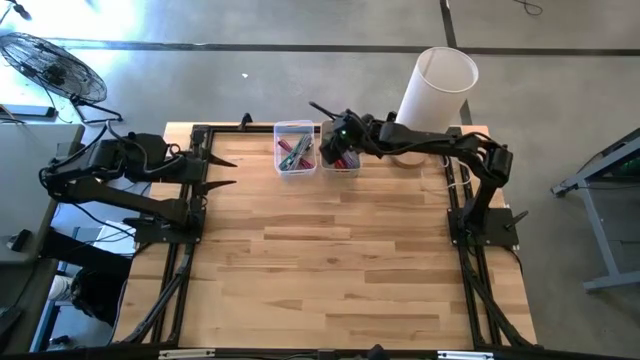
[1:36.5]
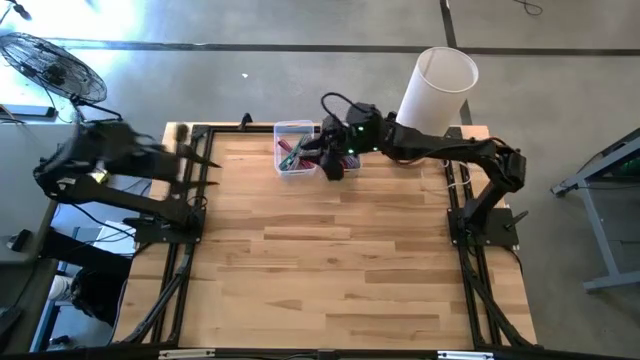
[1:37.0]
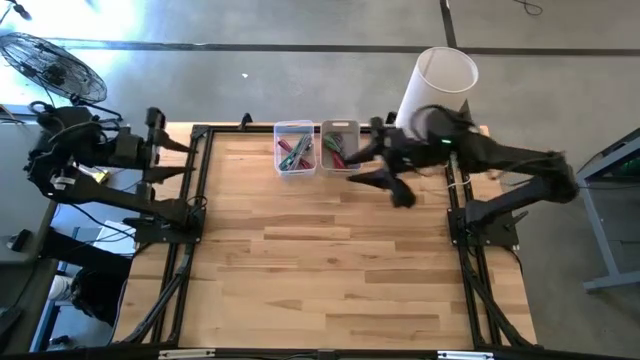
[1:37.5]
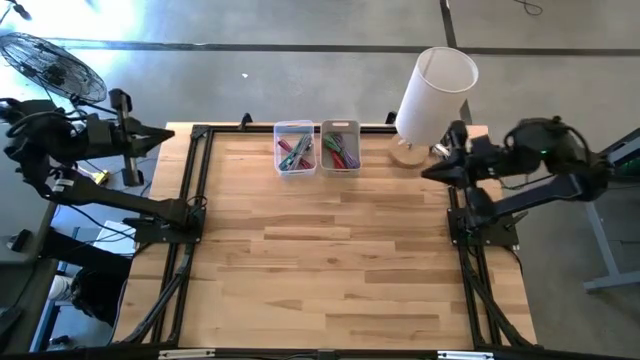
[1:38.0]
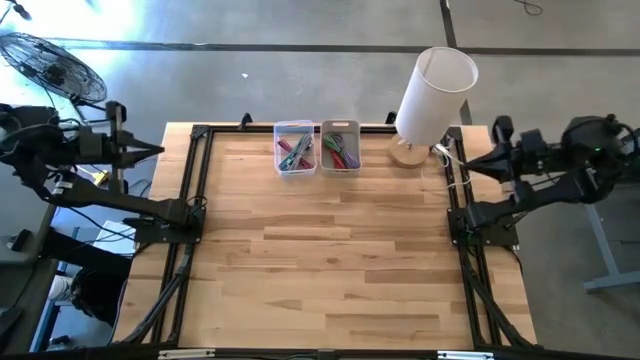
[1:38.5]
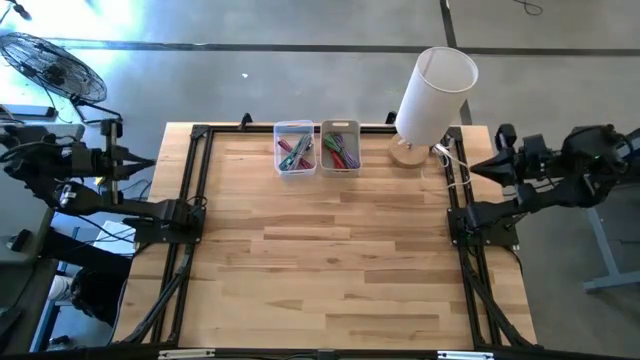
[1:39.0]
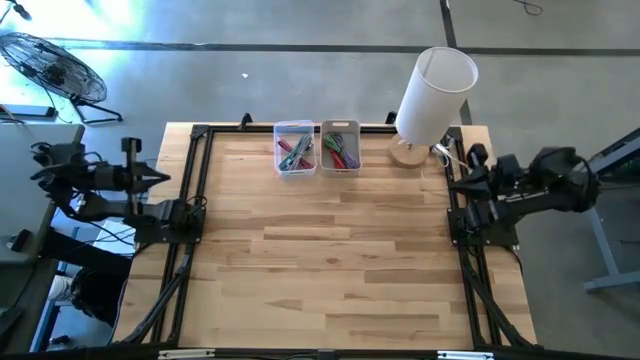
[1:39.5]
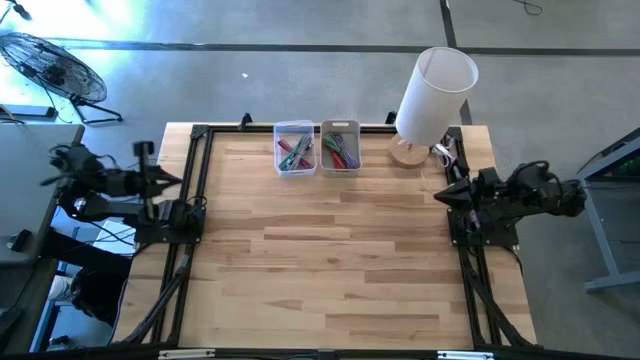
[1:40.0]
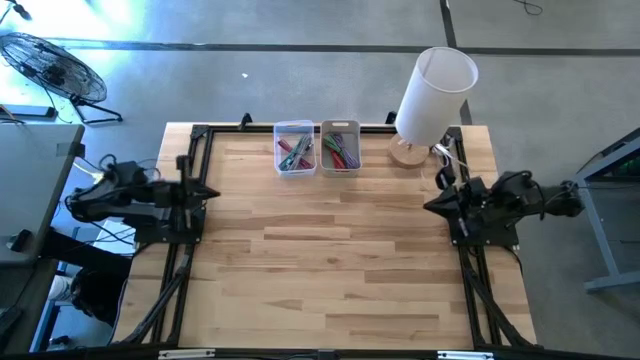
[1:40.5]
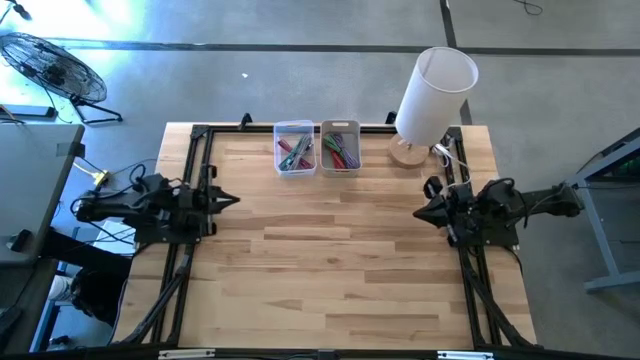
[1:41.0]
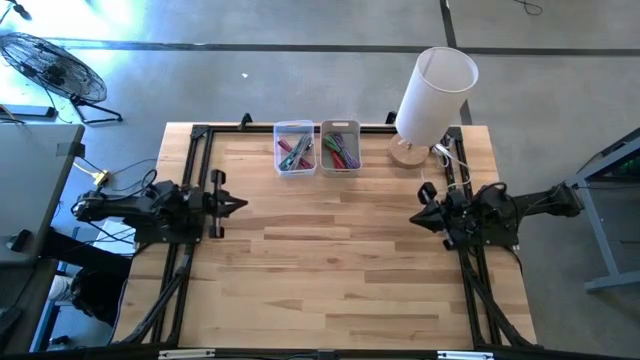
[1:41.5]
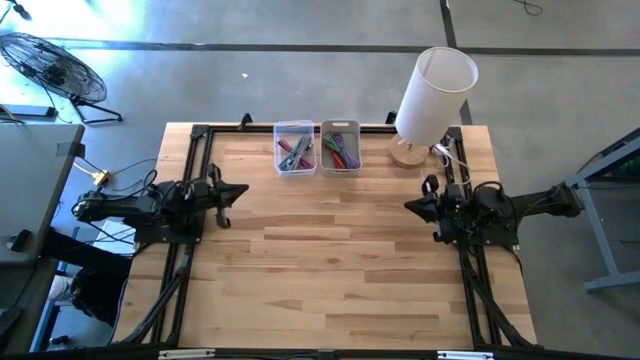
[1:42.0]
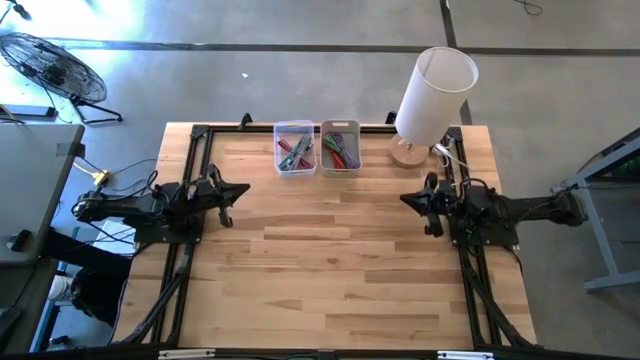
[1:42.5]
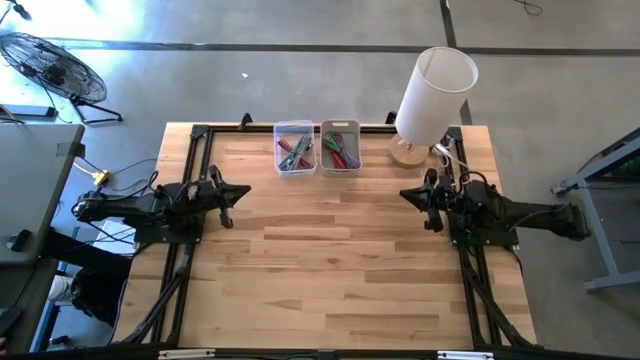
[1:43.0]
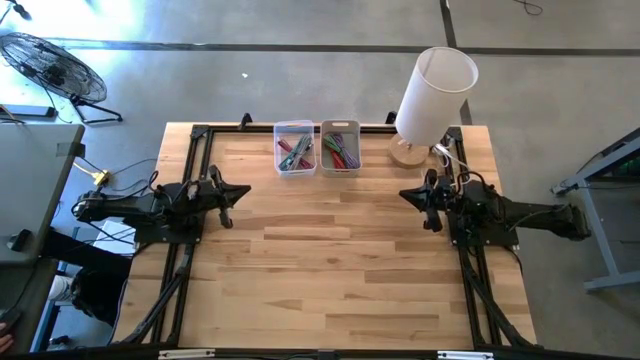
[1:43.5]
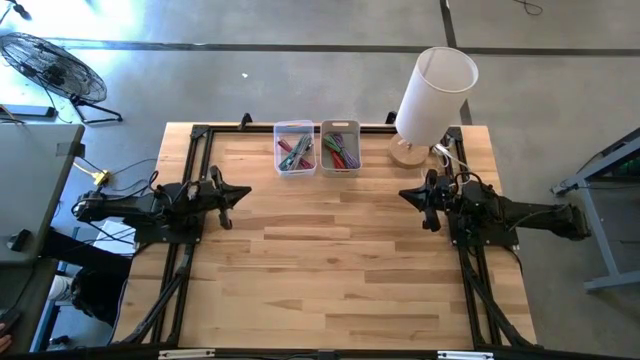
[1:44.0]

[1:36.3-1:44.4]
Task: Pick & Place USB Port
Return to Home Position

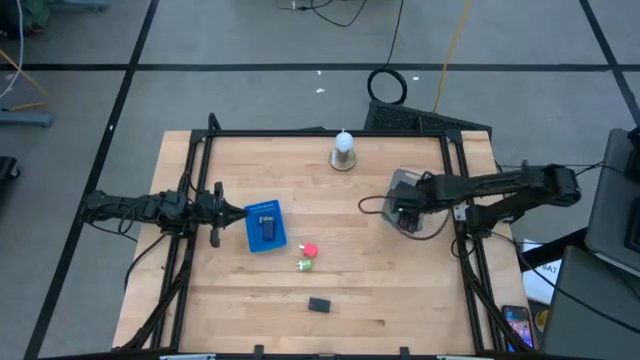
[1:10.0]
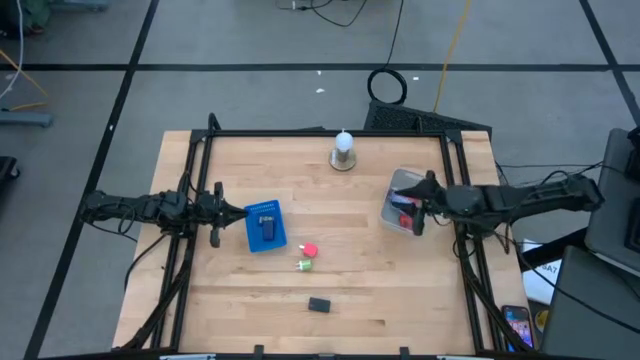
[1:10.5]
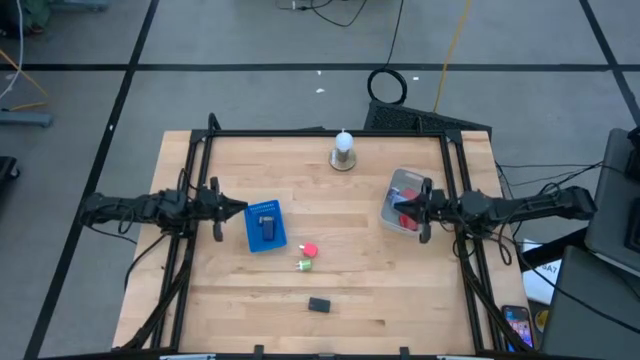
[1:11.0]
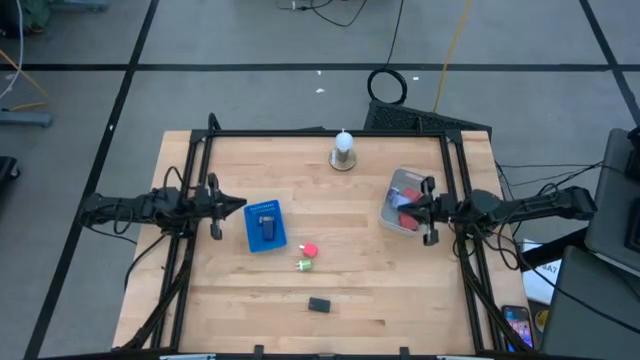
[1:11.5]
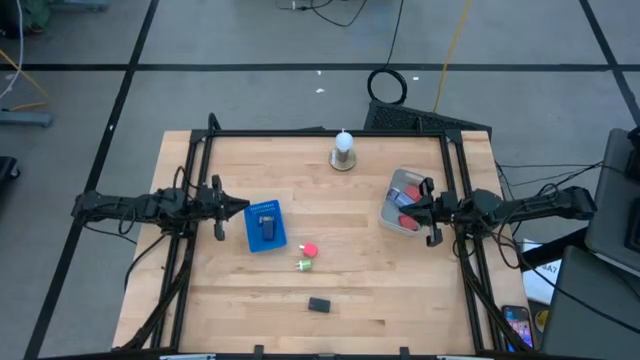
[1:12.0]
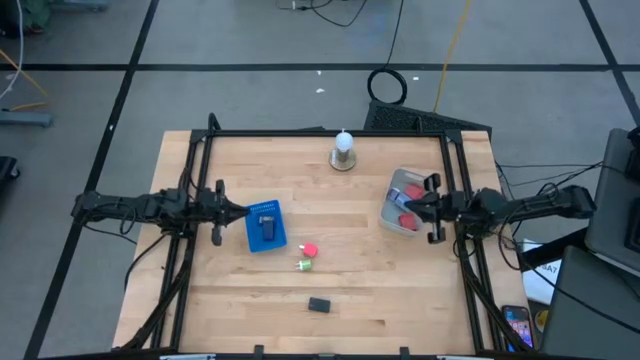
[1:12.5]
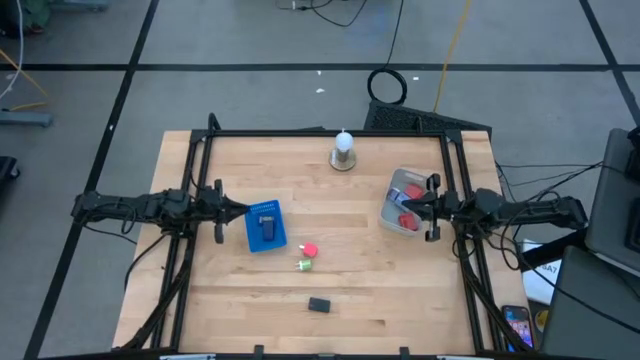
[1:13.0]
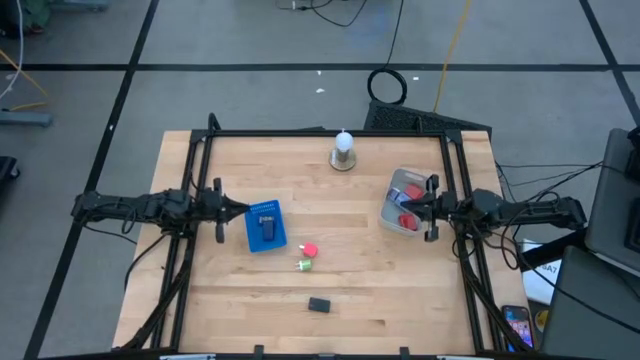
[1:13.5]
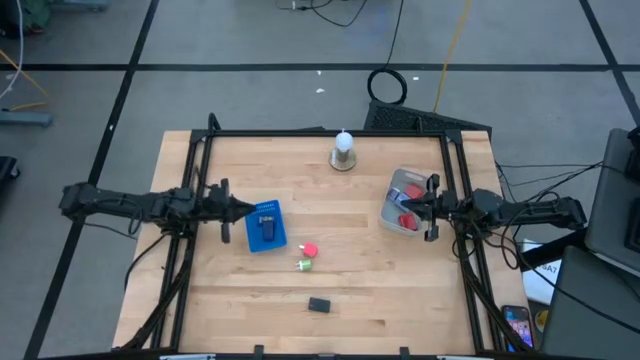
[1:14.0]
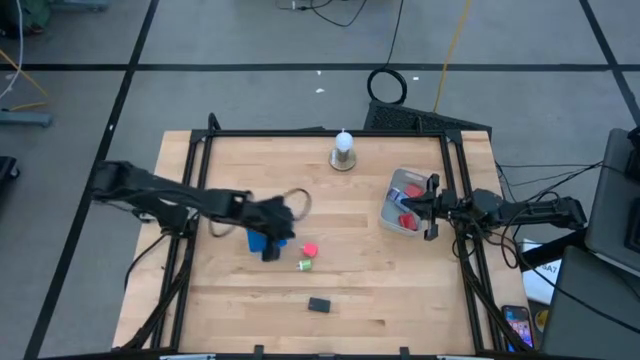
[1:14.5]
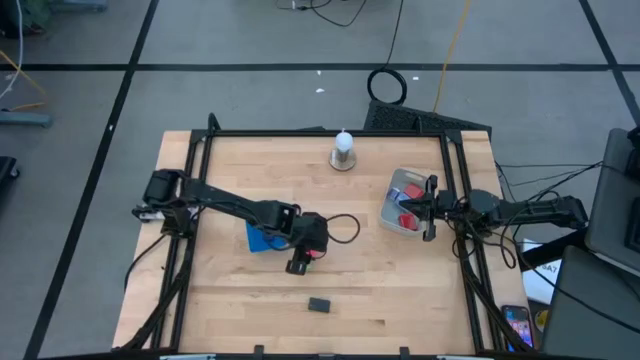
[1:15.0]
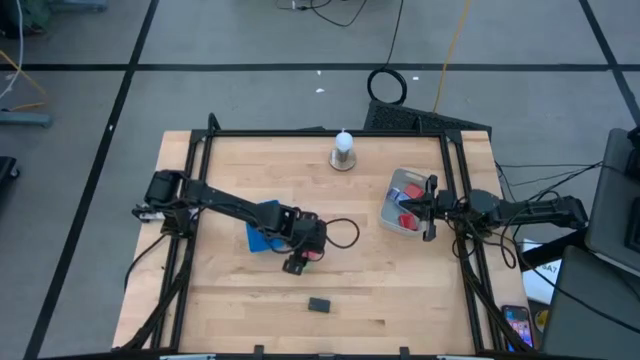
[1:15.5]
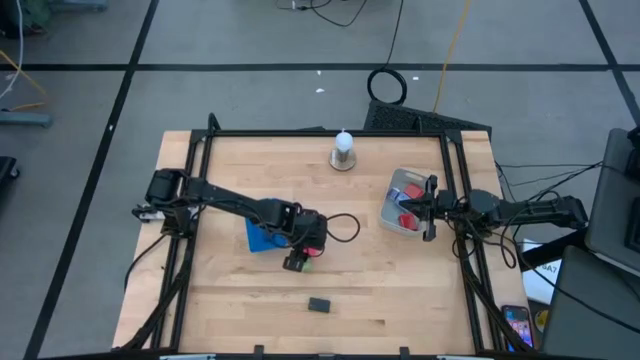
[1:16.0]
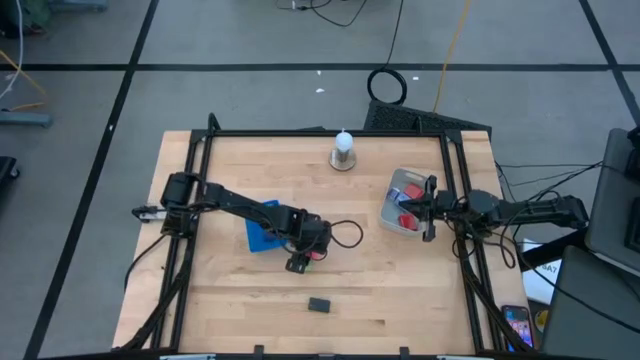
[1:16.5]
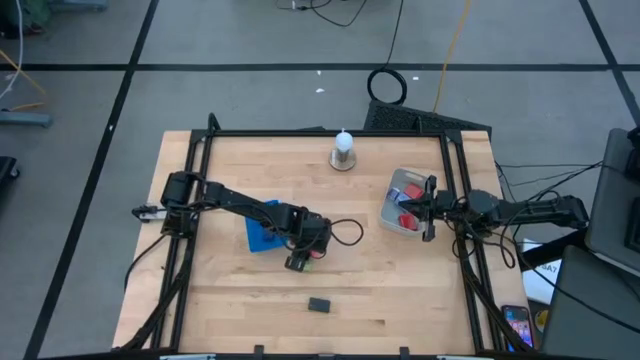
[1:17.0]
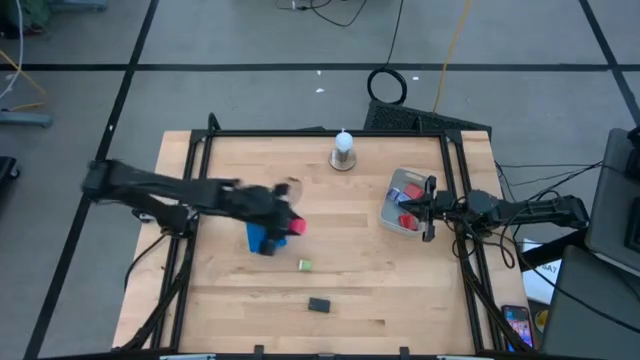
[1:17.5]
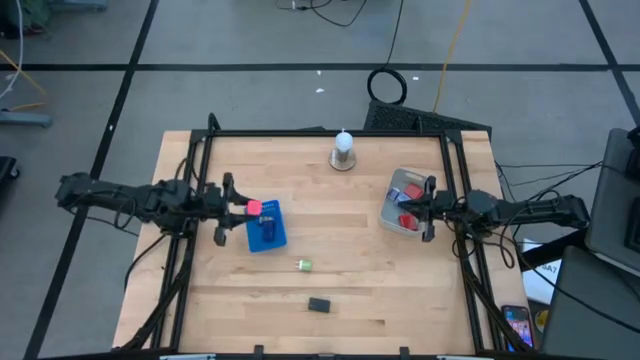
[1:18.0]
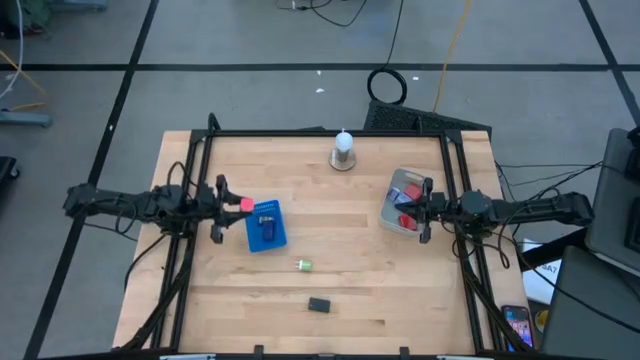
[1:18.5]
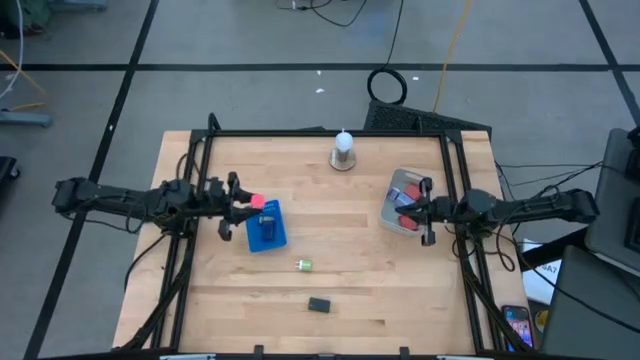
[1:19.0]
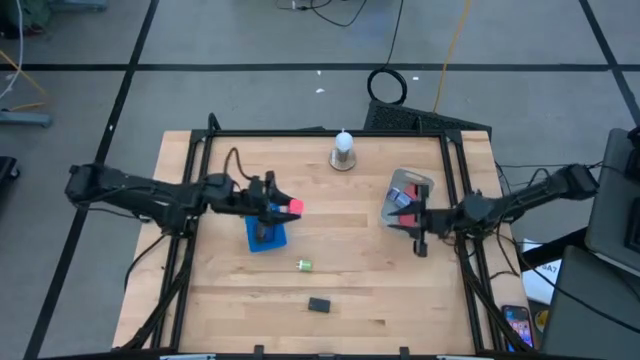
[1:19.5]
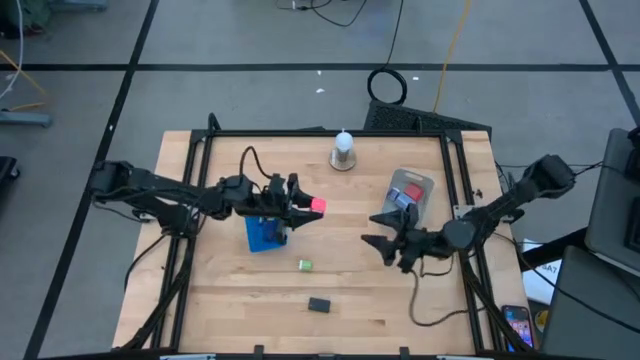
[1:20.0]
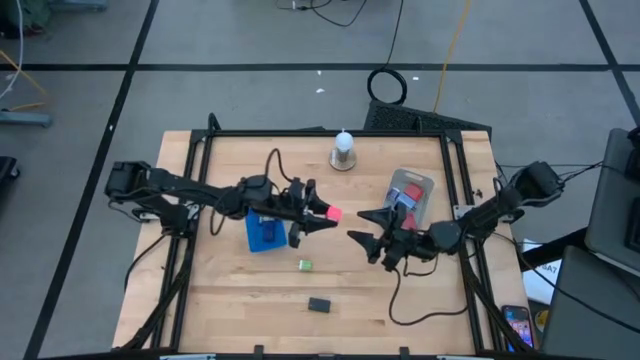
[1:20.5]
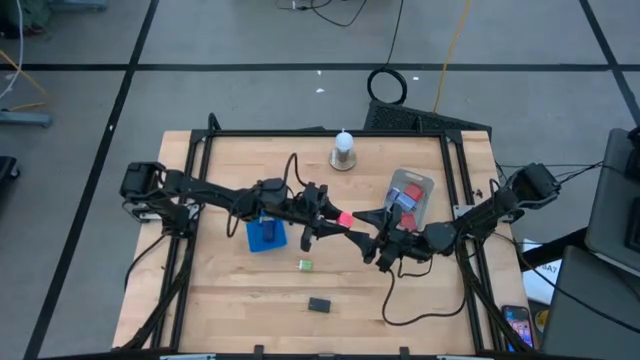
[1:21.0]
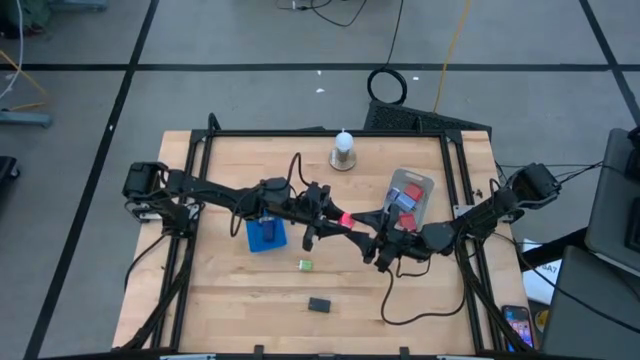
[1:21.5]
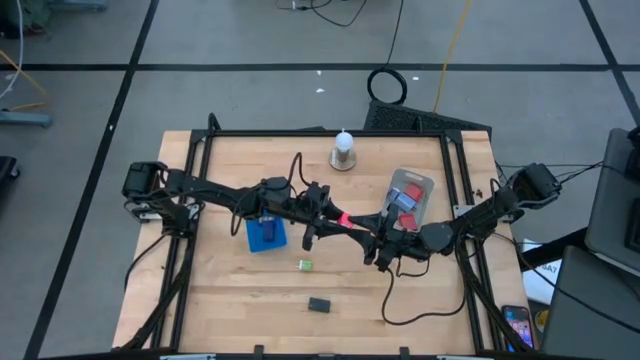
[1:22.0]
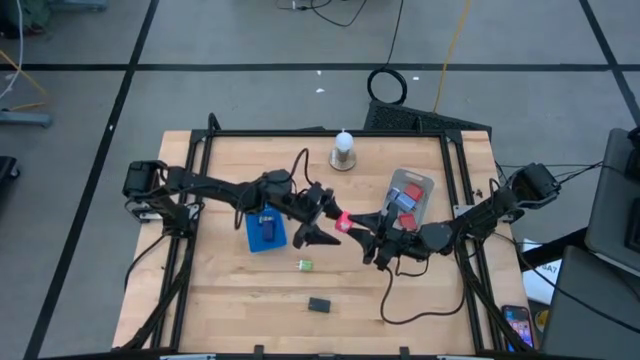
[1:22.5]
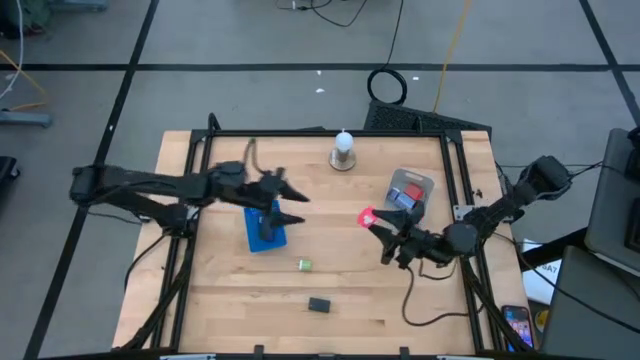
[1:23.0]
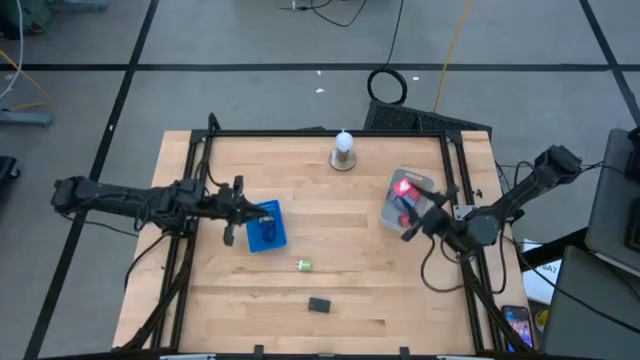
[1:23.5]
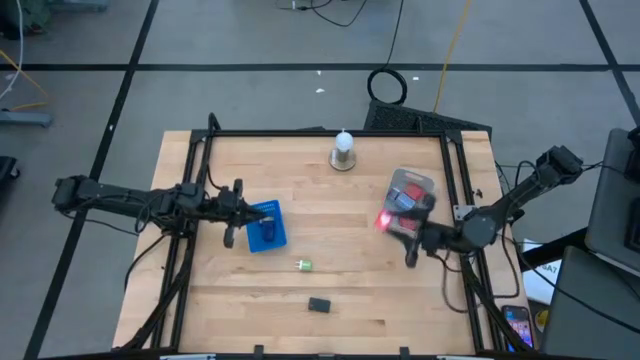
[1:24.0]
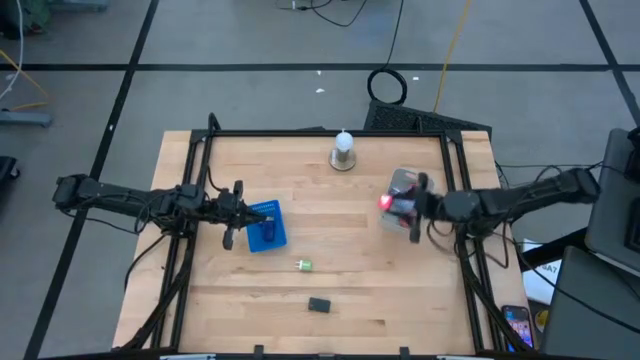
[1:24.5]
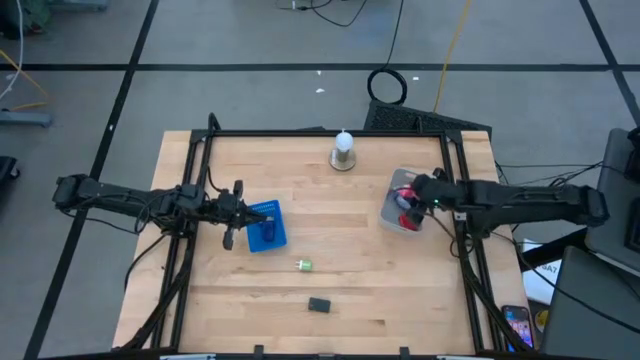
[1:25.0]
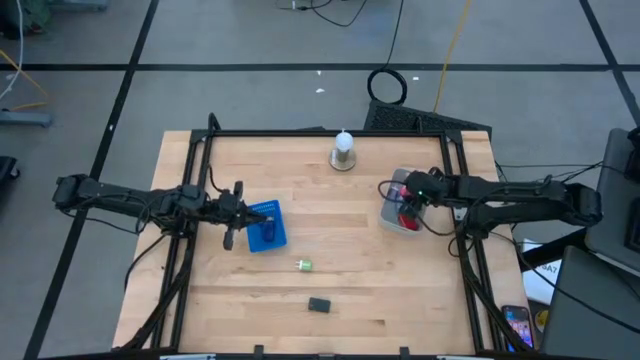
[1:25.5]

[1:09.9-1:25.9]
Task: Pick & Place Office items
Put the pink charger adapter into the gray bin
